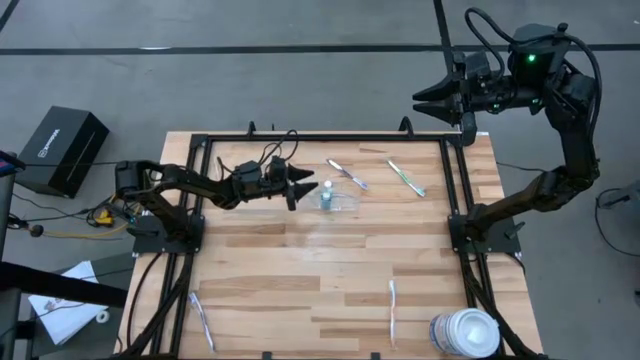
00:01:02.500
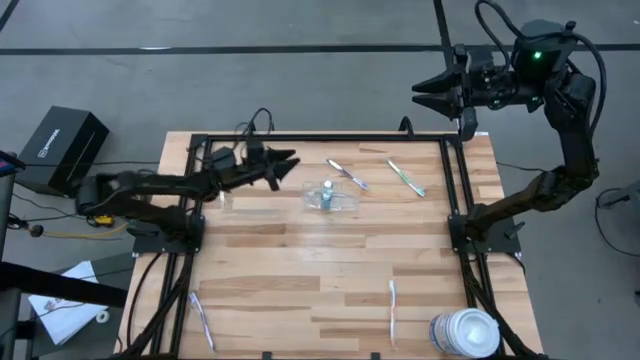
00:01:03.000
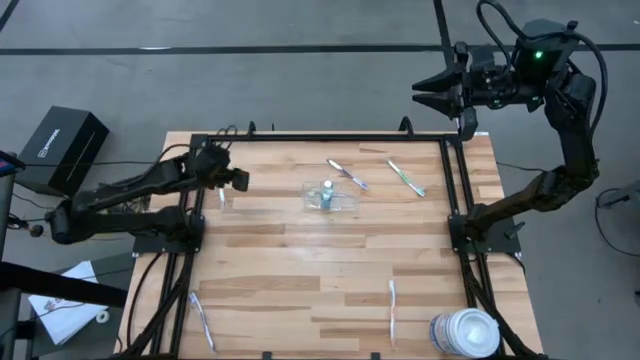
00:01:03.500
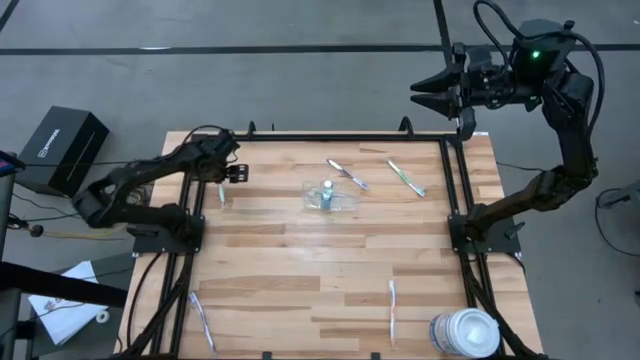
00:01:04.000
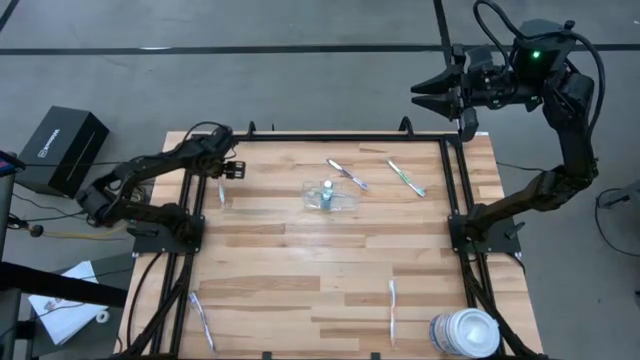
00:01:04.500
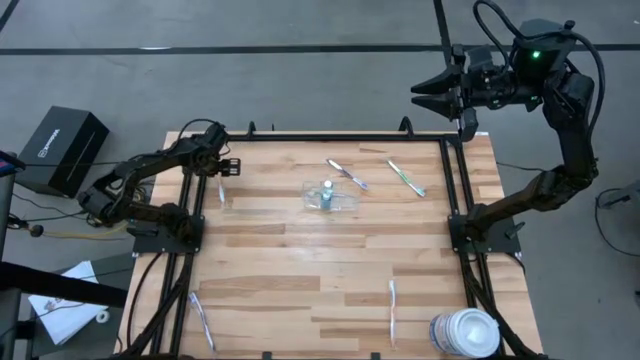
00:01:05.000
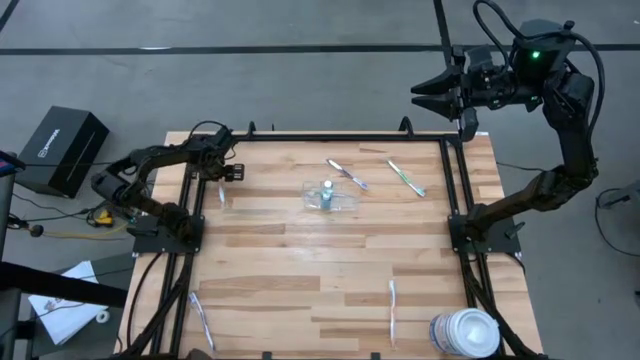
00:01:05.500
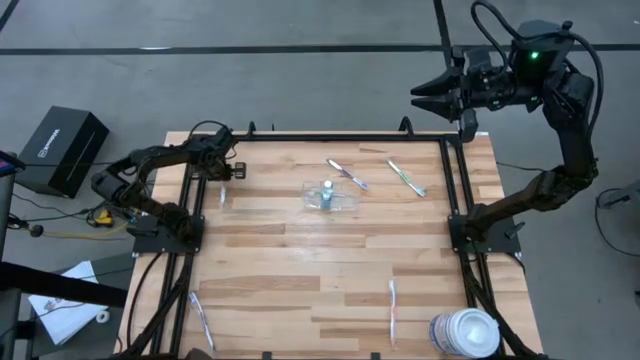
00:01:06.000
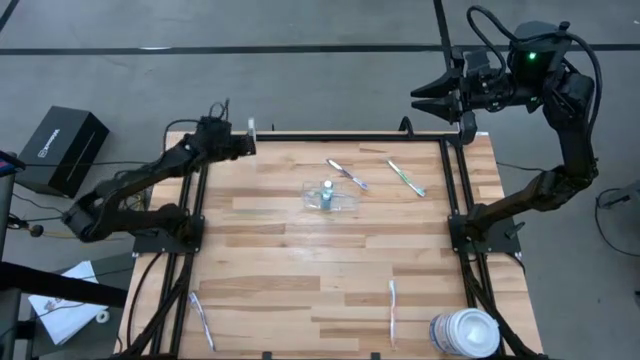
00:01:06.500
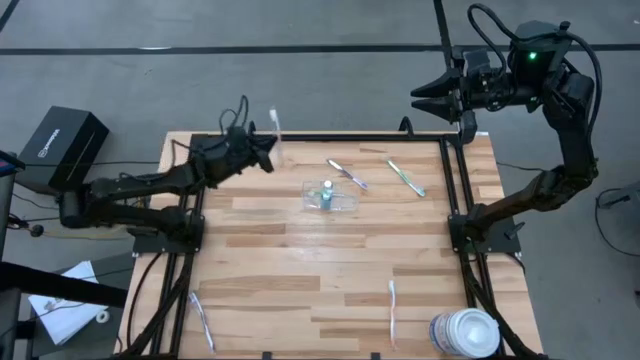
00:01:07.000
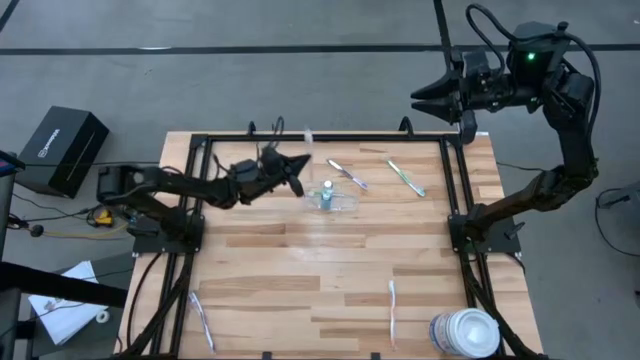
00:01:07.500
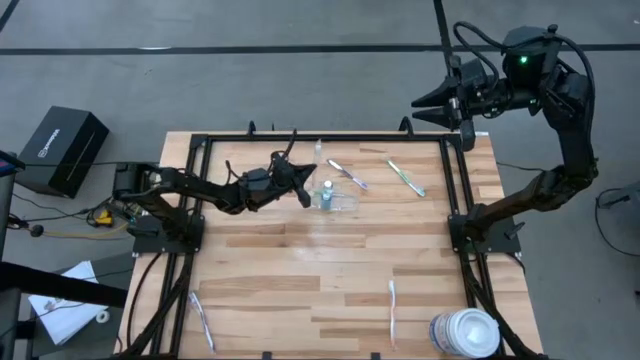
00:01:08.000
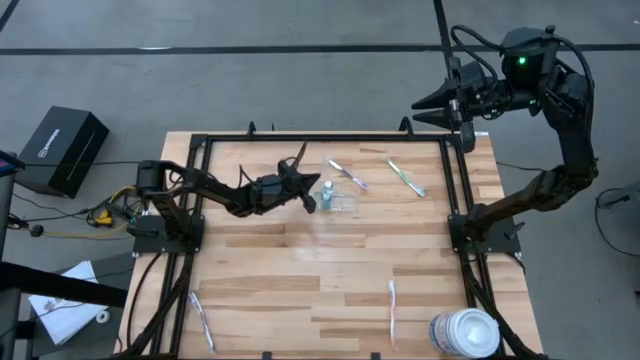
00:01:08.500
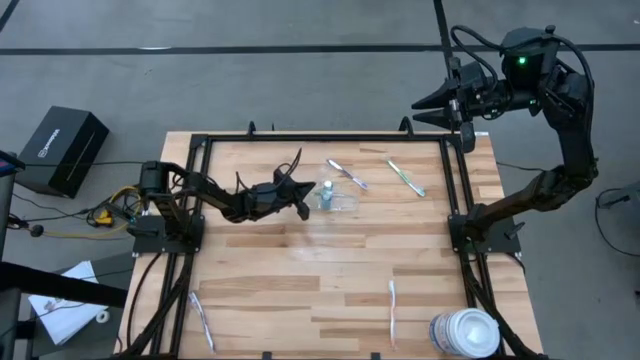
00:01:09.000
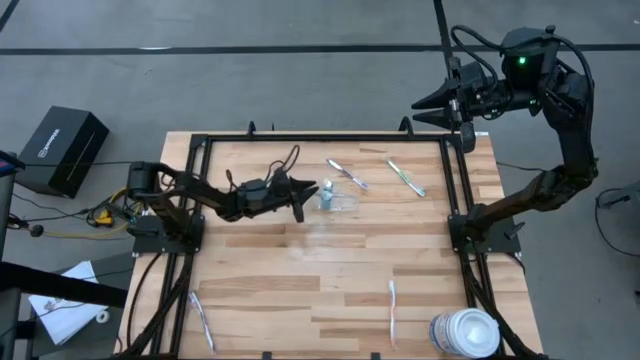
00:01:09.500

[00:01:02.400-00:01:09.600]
Task: Pick & Place toothbrushing station
Put the top orange toothbrush into the transparent organizer

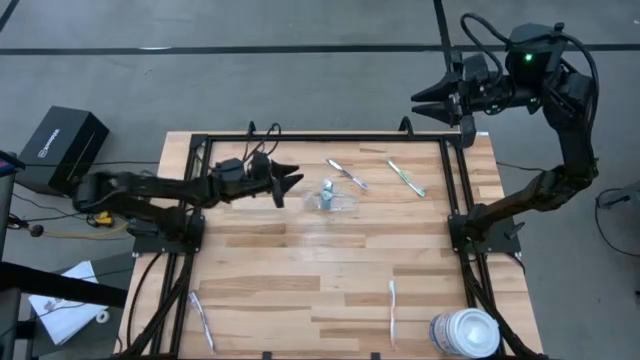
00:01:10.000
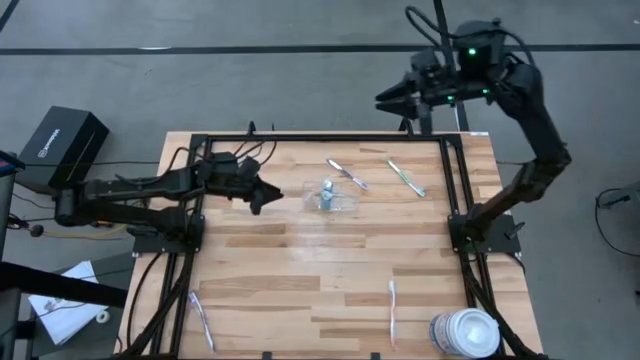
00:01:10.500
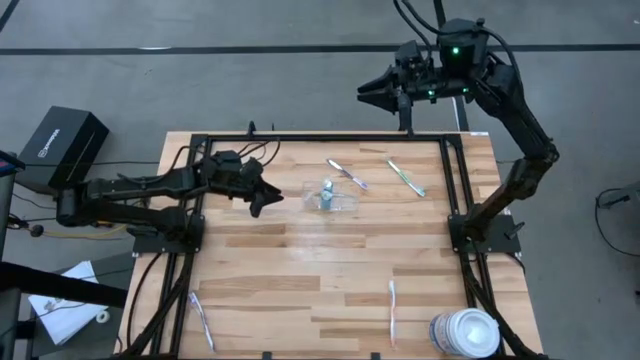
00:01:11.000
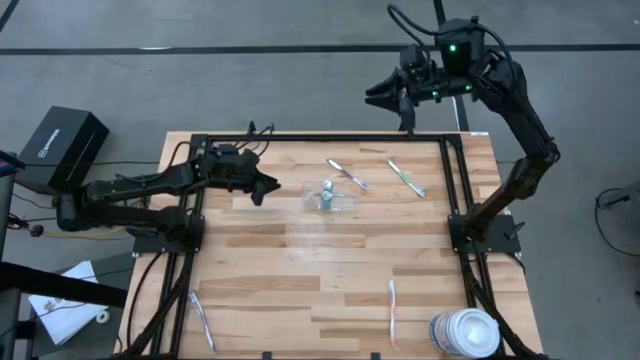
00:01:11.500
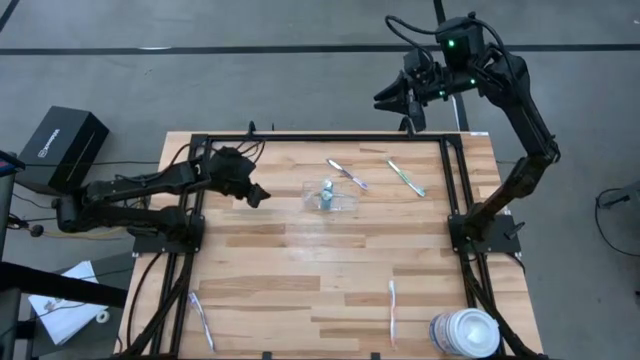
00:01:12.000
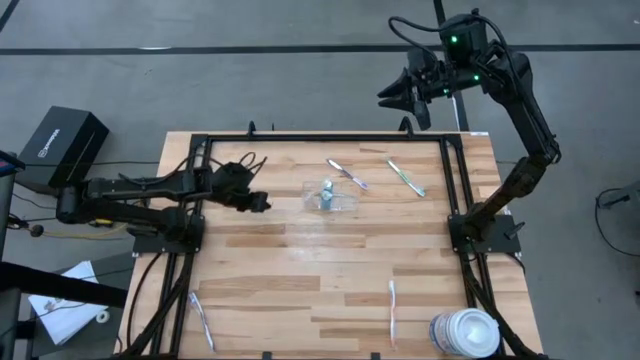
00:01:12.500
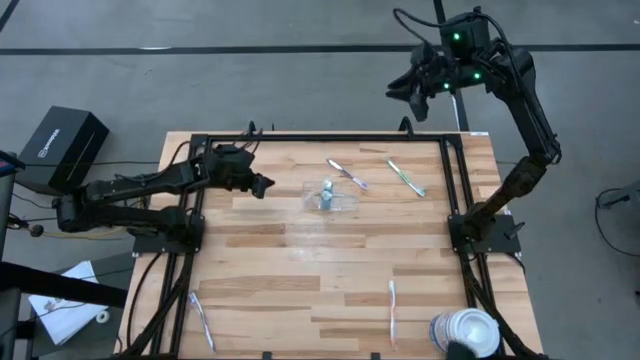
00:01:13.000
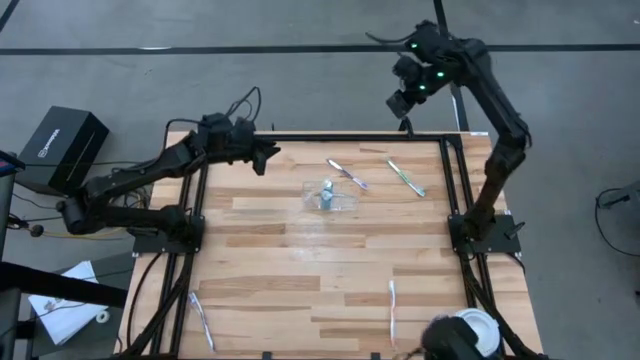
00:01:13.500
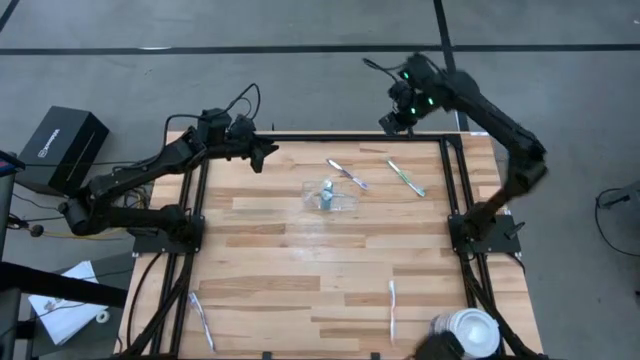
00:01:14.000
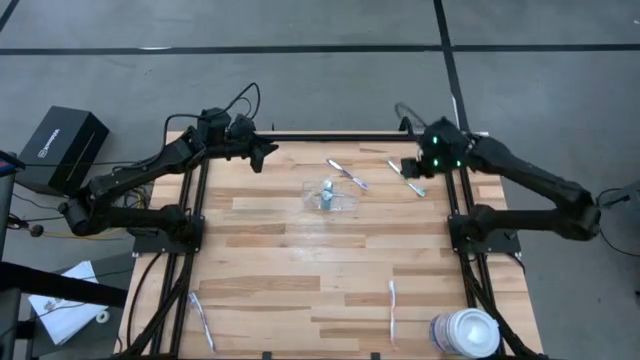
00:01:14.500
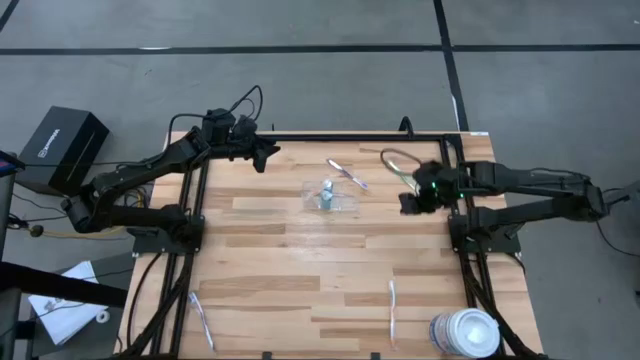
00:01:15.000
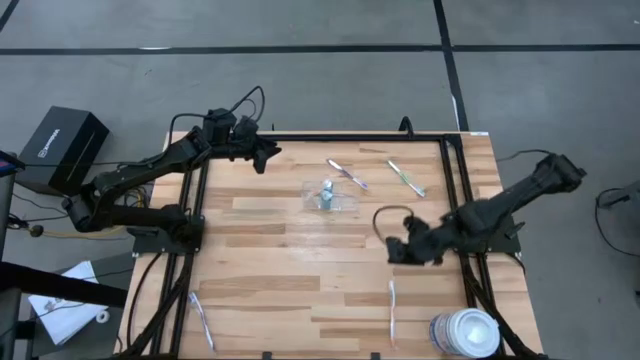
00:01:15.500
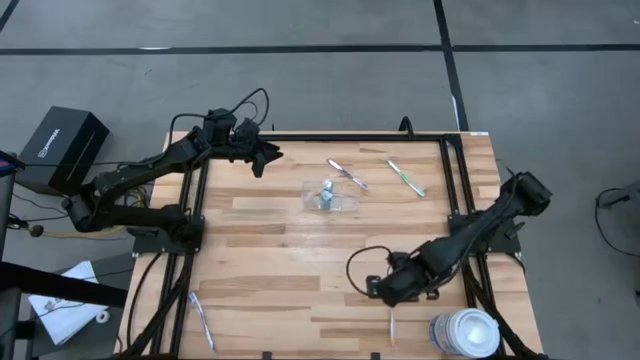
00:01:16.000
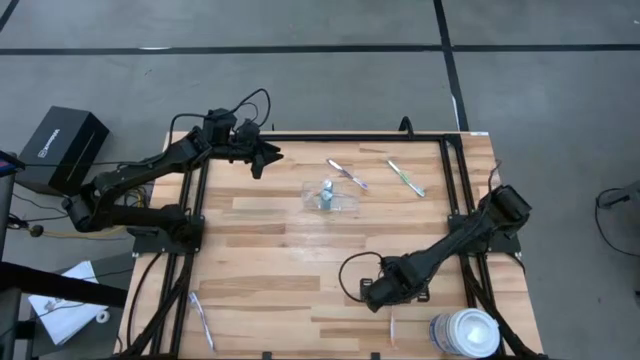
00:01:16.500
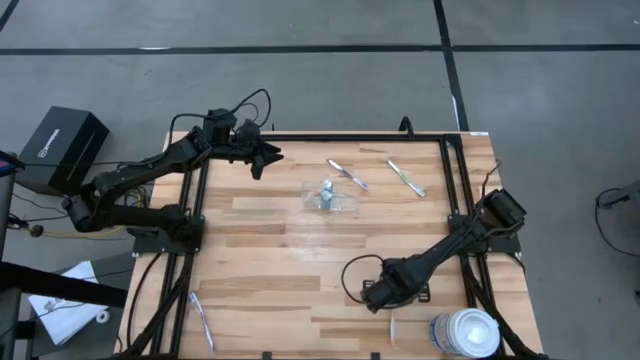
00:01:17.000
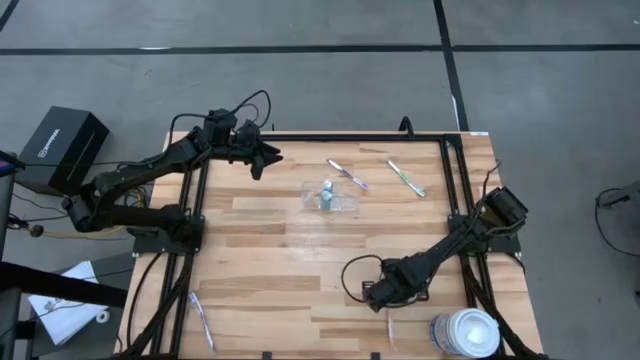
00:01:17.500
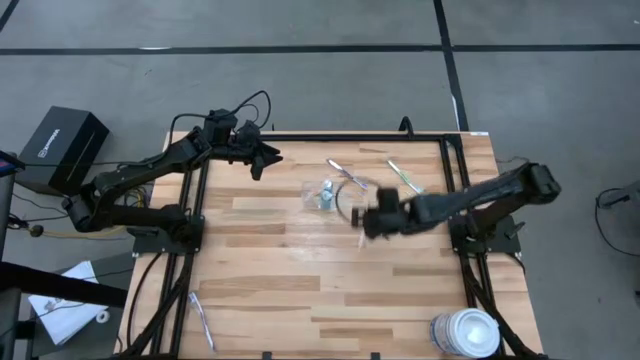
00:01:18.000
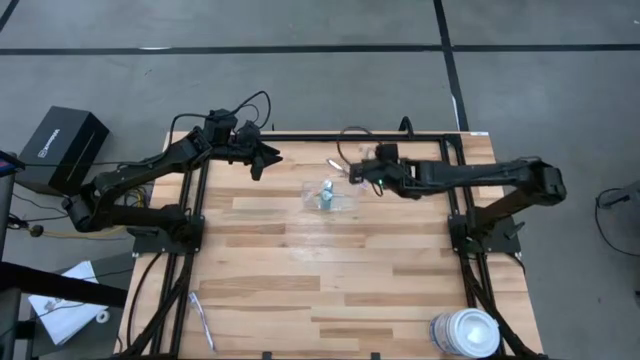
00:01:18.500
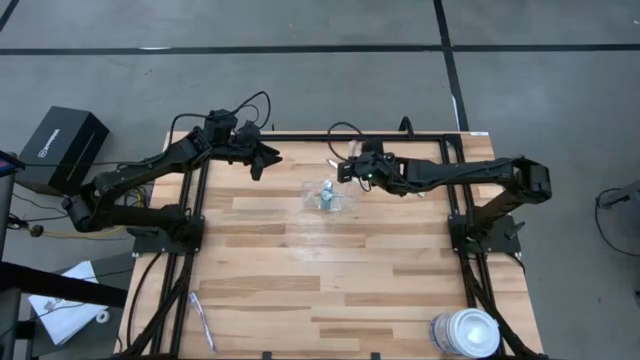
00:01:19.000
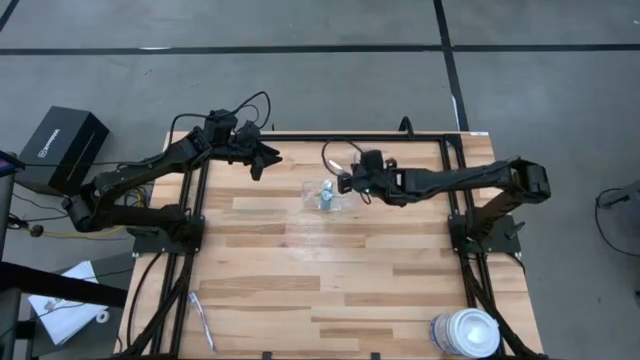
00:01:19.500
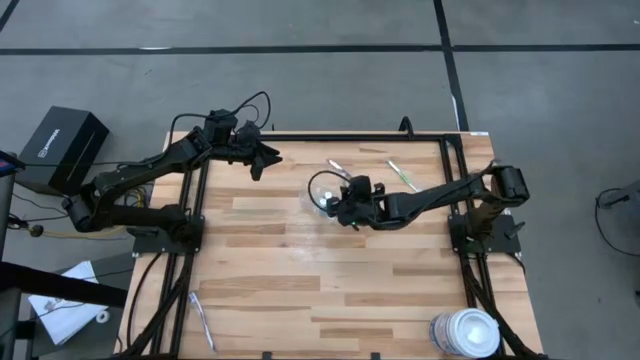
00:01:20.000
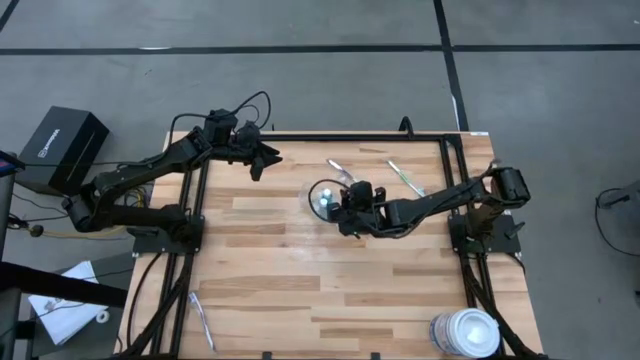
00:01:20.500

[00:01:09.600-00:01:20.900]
Put the orange toothbrush into the transparent organizer

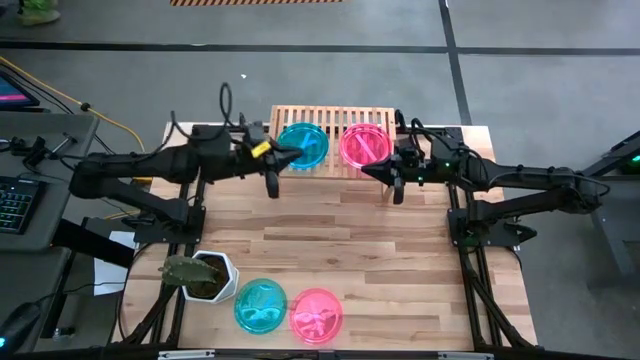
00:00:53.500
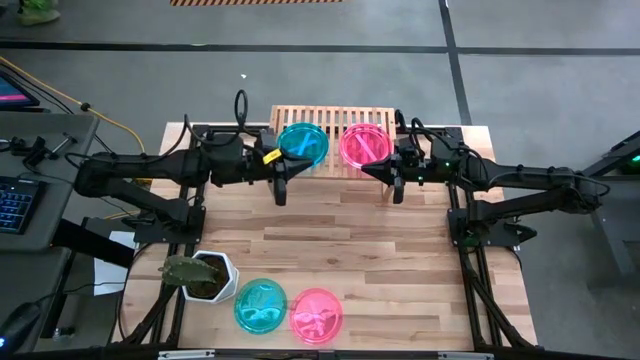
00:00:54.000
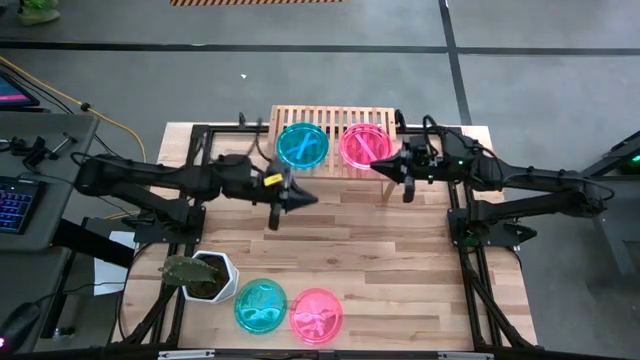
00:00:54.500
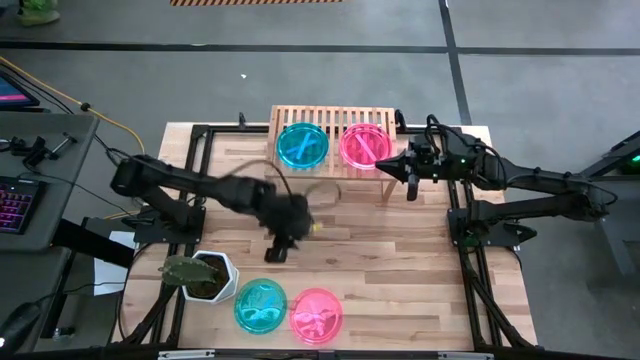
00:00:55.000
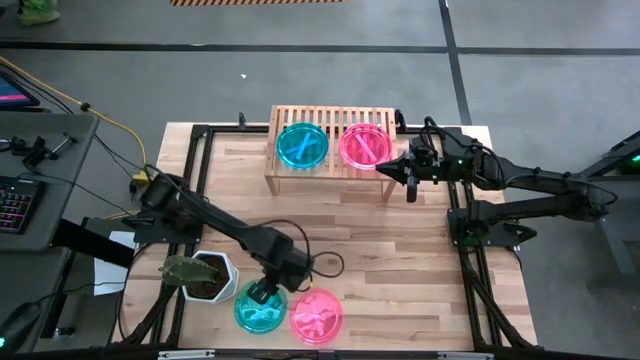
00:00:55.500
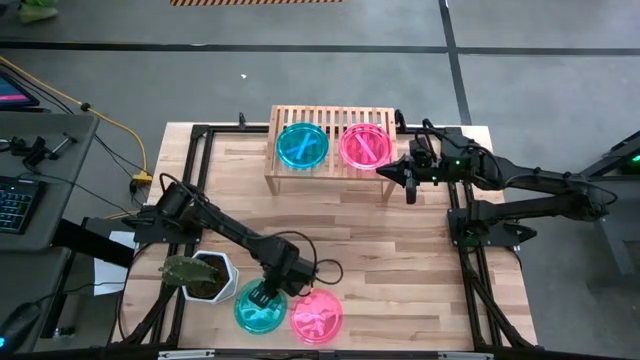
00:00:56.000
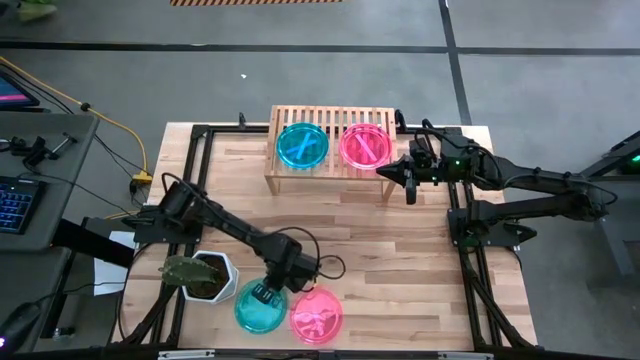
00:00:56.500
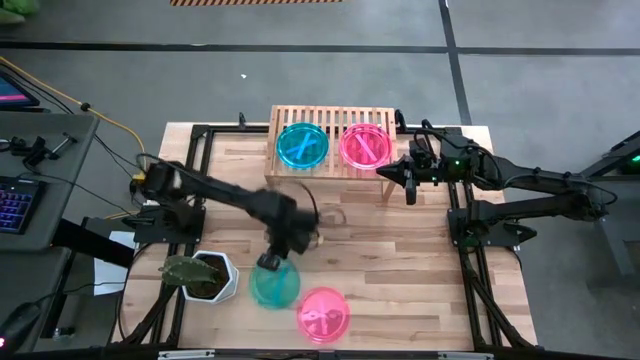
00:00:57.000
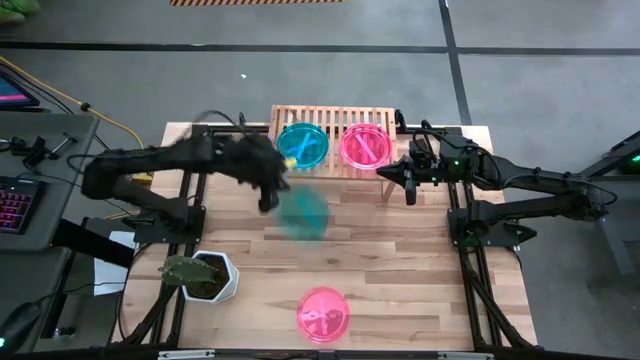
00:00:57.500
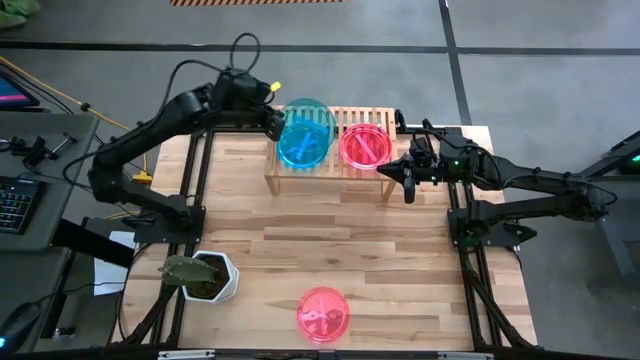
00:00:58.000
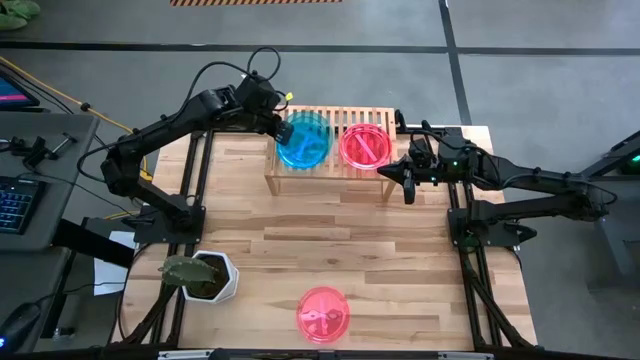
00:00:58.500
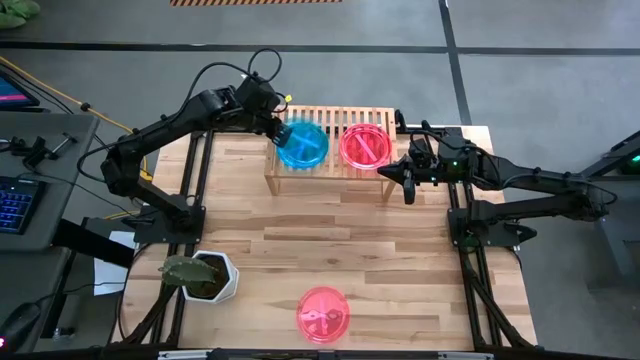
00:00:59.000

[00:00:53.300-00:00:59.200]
Task: Place and stack plates onto a shelf
Stack the blue plate on the blue plate
